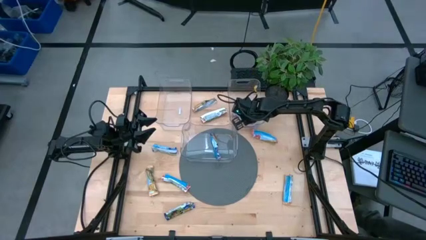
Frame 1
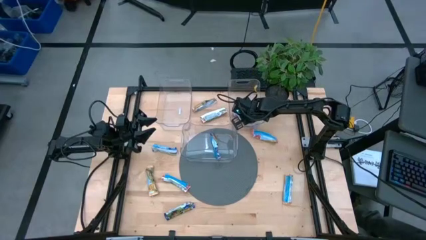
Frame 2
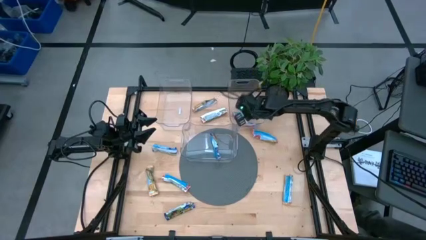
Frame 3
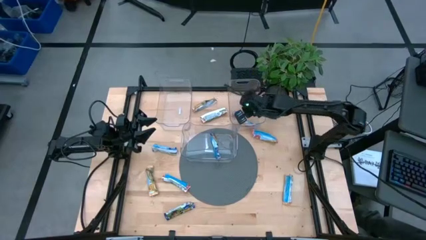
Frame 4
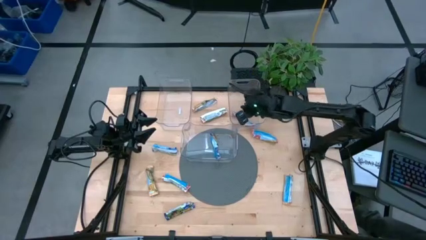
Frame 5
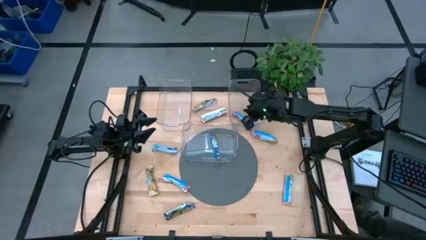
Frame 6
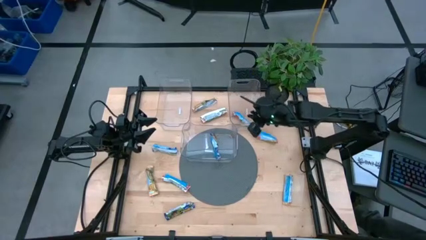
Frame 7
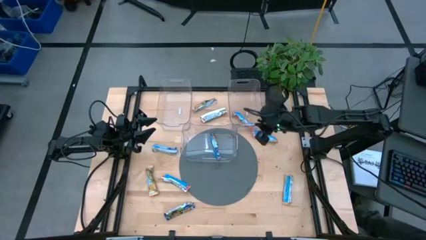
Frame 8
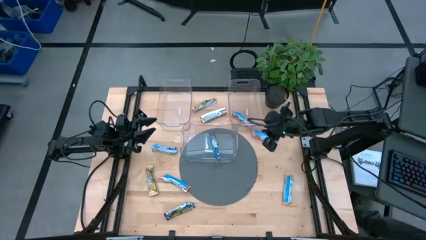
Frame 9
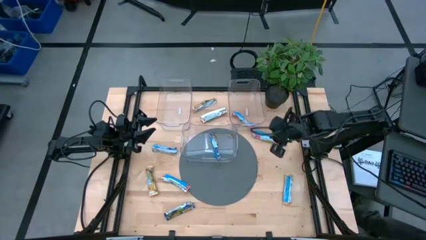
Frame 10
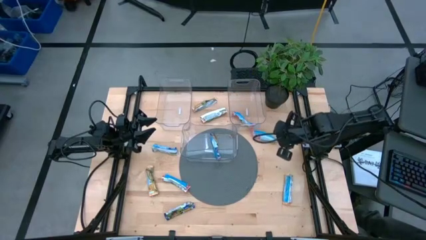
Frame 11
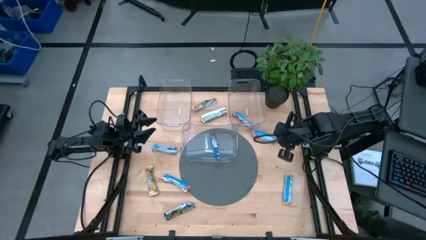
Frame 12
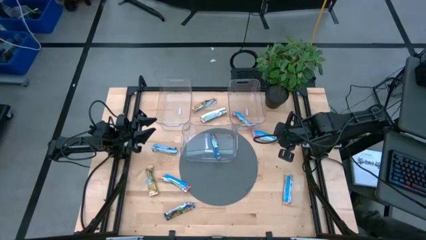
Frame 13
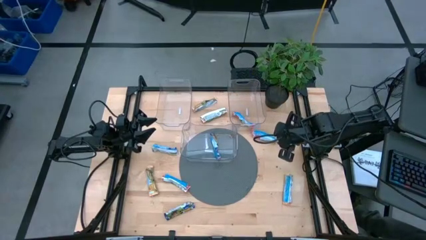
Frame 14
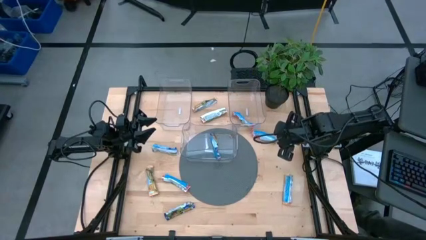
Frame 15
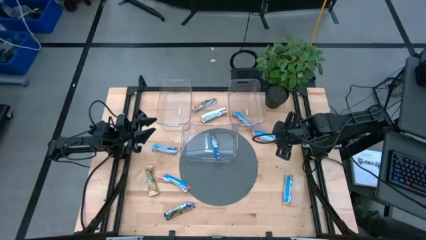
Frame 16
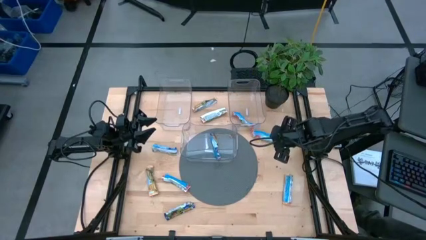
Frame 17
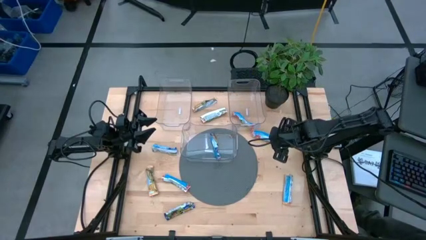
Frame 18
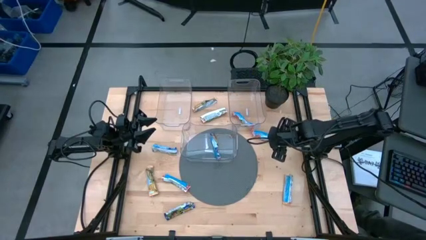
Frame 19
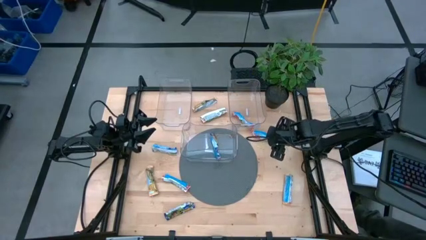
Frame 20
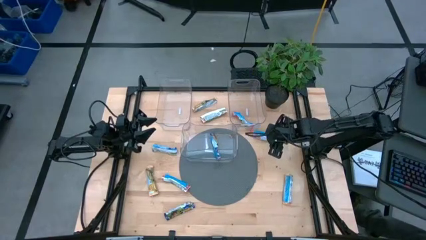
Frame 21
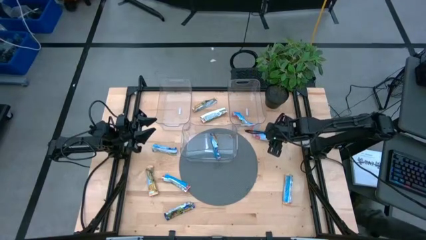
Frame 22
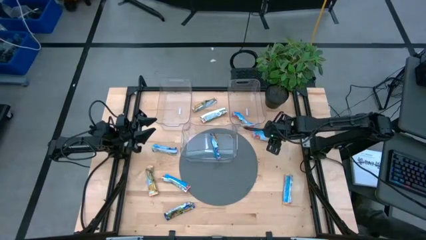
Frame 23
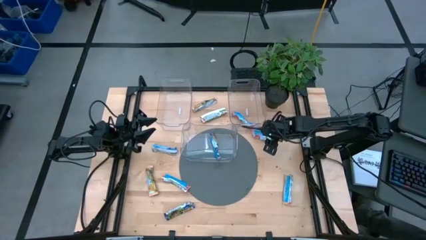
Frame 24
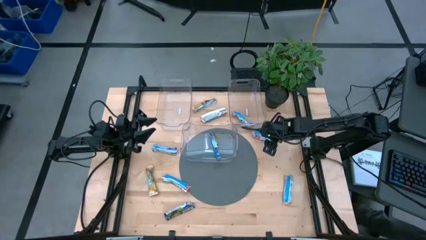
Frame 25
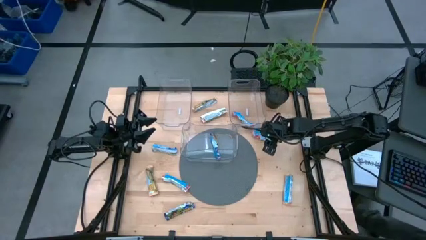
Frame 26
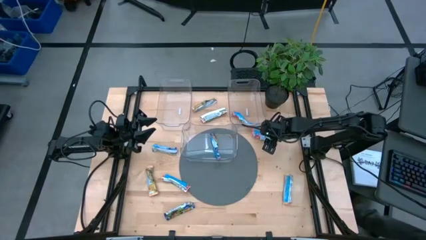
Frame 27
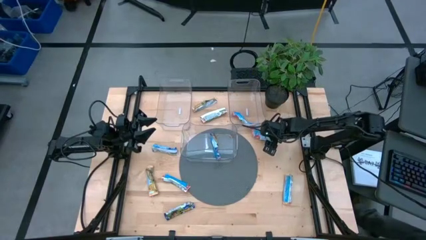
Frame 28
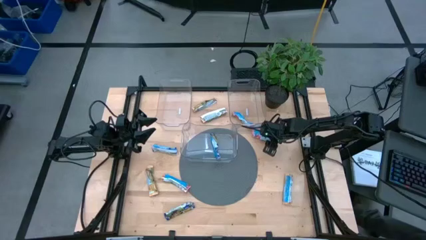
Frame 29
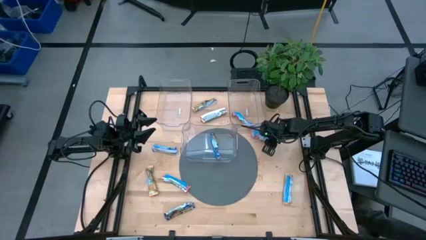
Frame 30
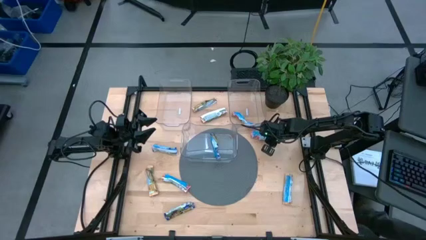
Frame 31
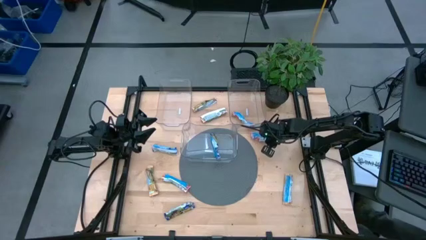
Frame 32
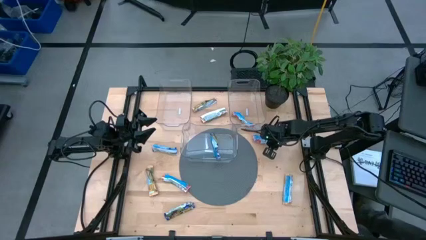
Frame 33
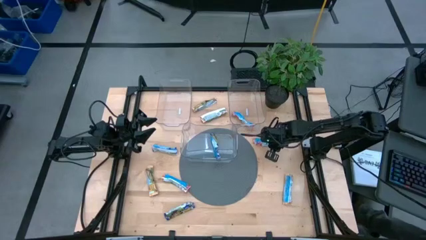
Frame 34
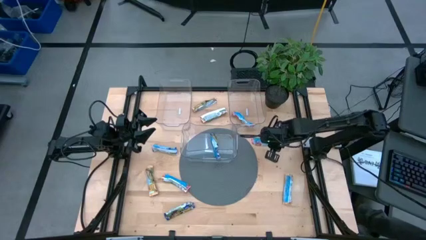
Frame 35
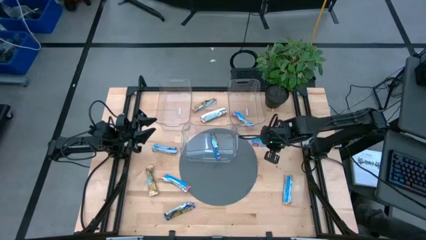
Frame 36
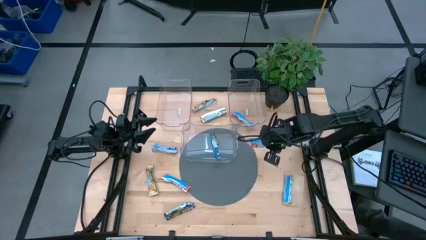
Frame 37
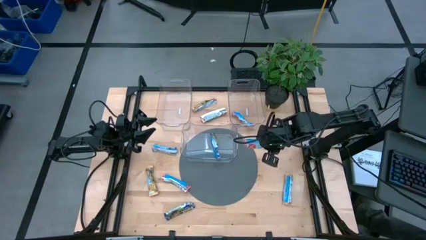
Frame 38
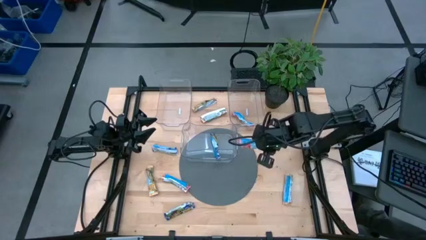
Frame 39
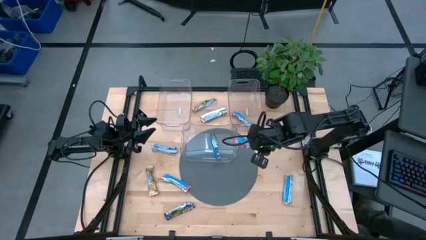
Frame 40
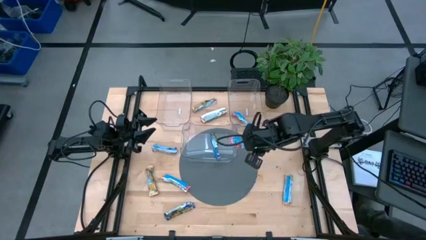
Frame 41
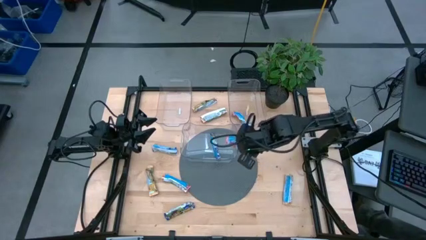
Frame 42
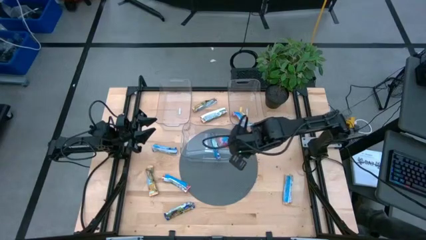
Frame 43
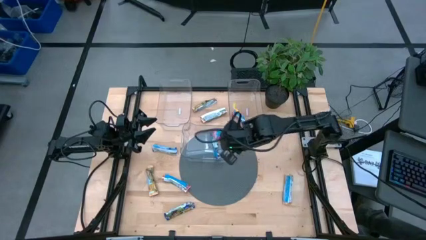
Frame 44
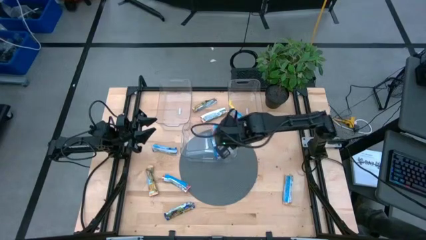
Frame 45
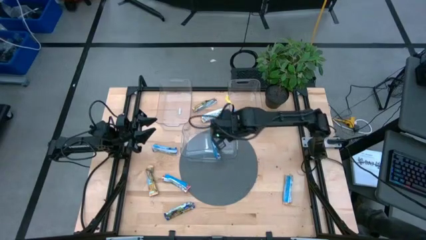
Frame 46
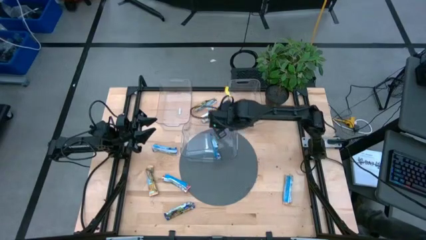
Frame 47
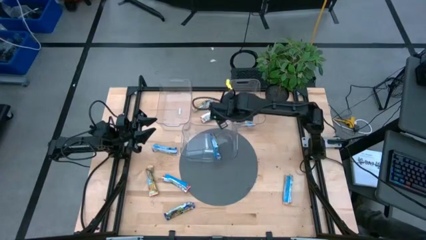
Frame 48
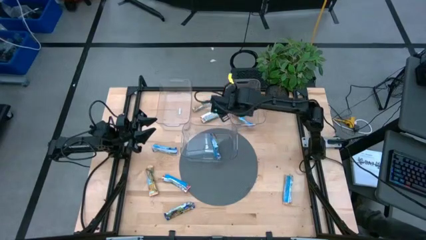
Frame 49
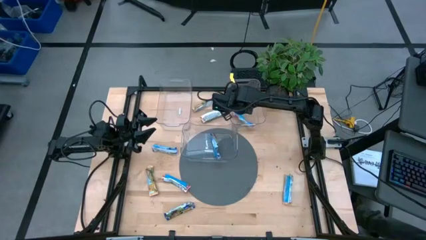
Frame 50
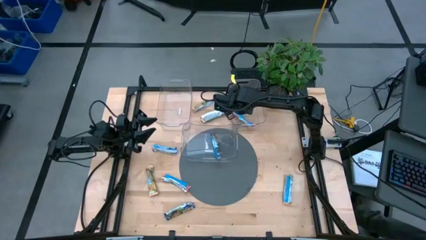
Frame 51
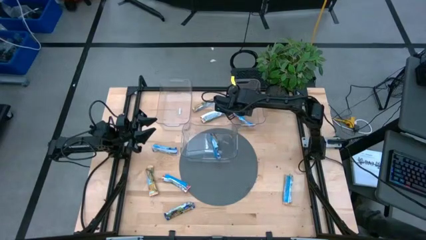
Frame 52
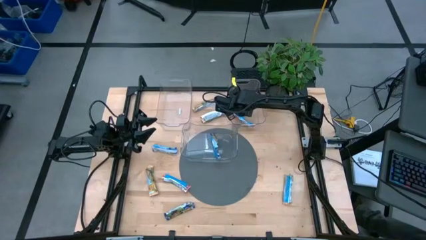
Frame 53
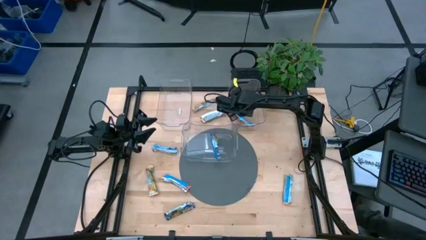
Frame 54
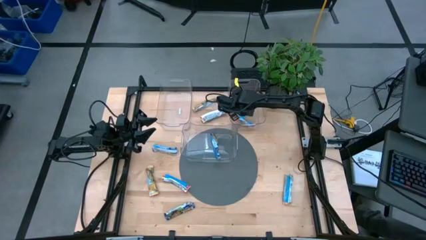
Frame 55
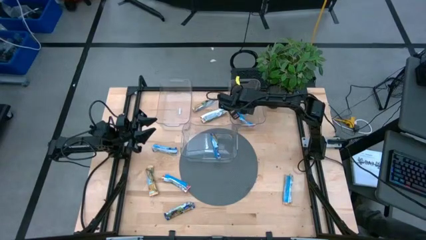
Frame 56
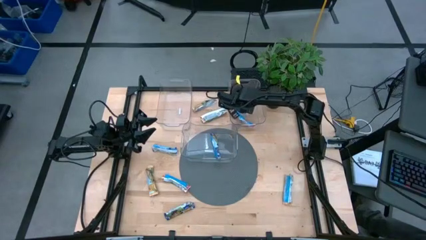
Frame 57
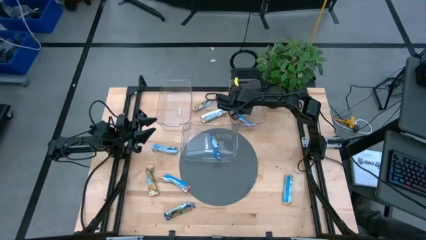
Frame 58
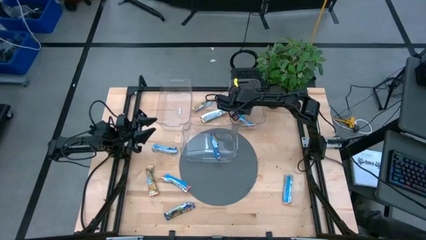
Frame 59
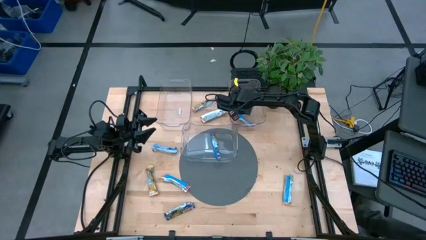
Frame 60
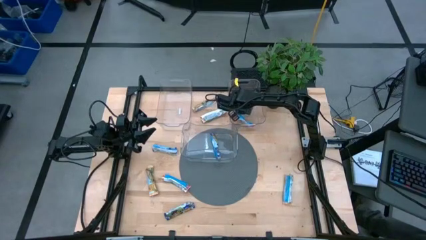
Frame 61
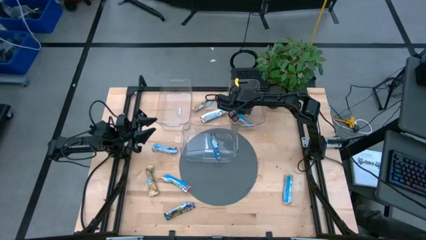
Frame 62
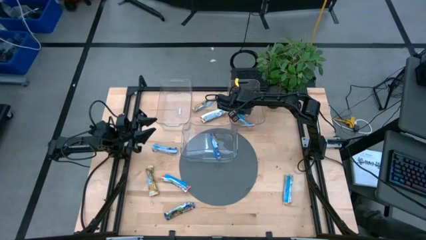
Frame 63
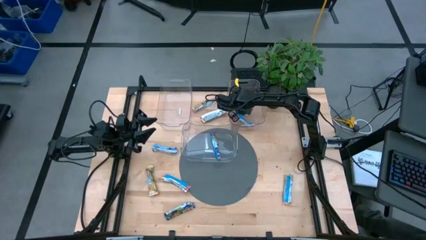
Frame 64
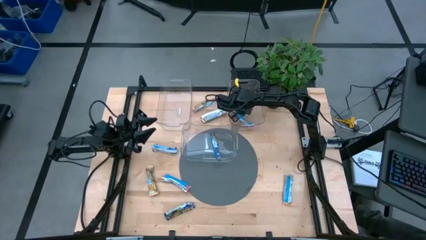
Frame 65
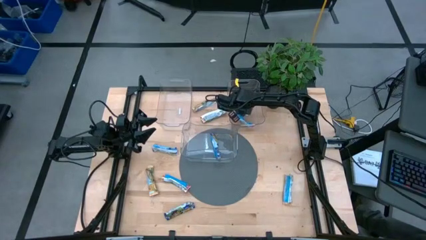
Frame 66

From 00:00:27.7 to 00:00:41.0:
Task: Pick and place Granola Bars by type
Put the red granola bar into the top right transparent bin
